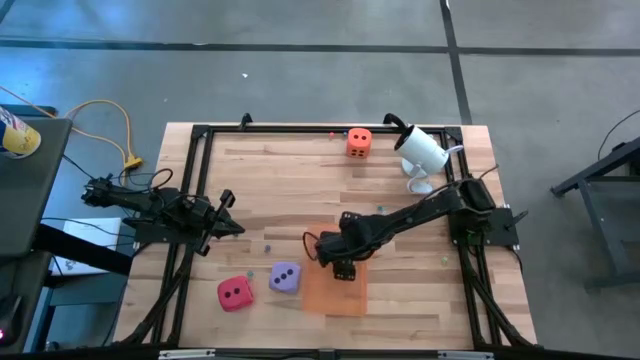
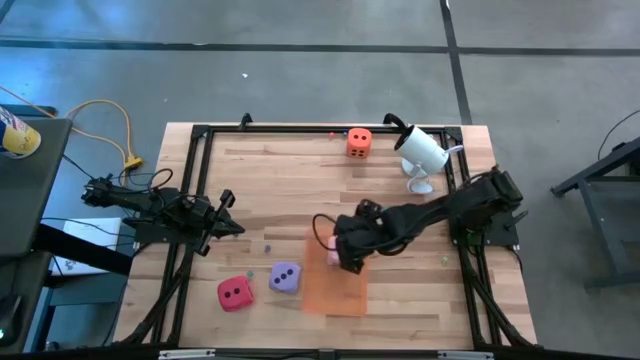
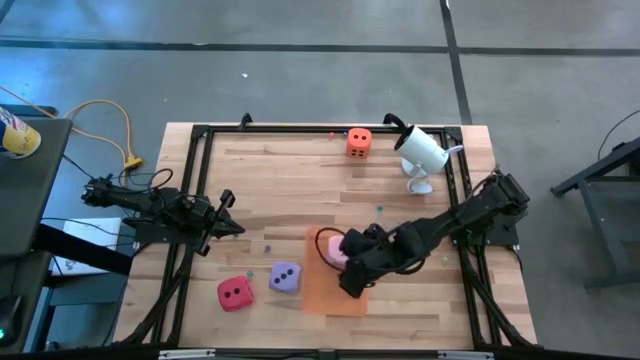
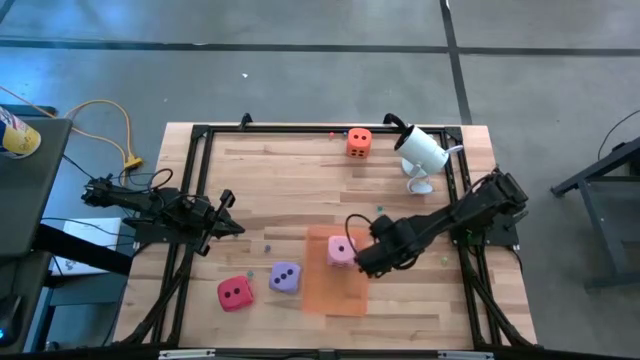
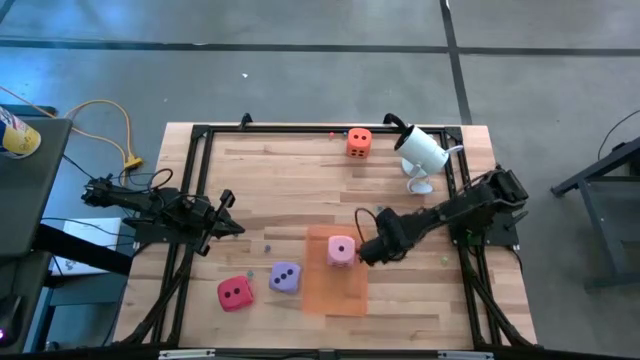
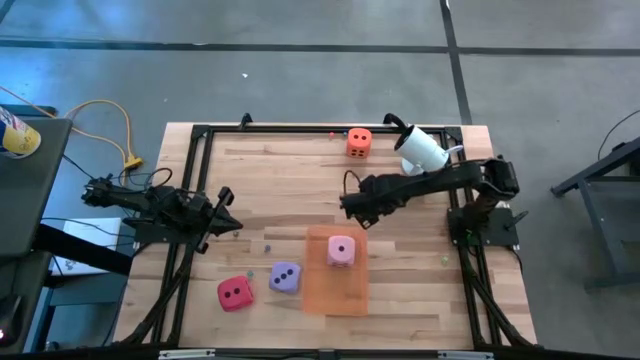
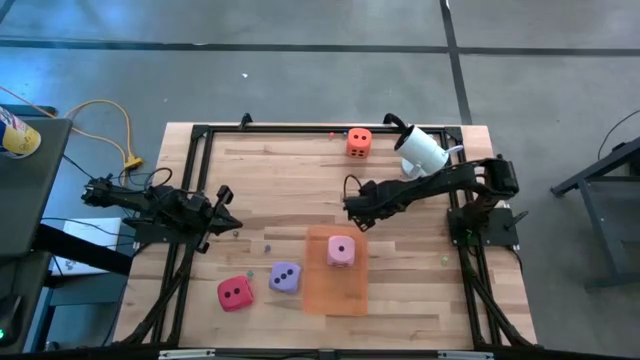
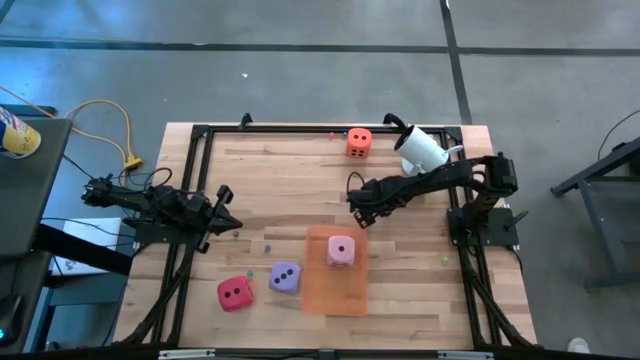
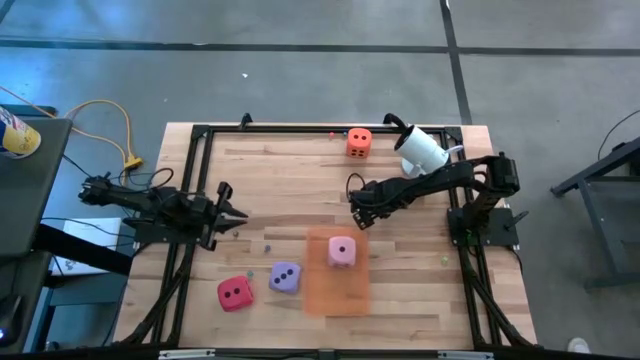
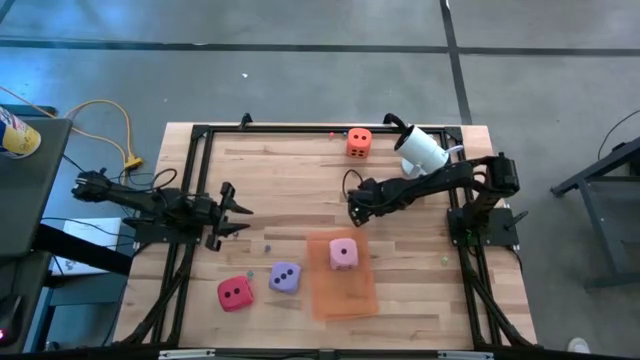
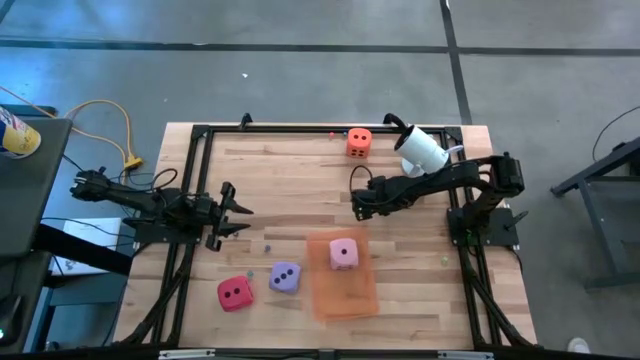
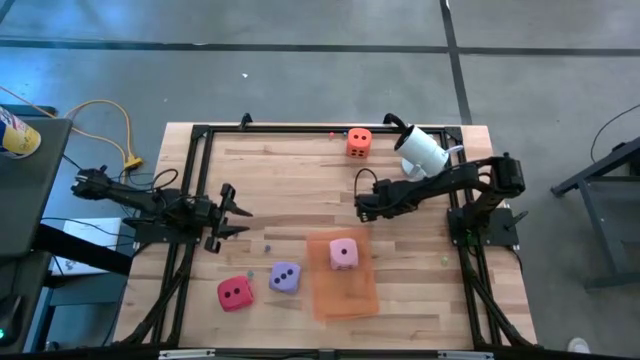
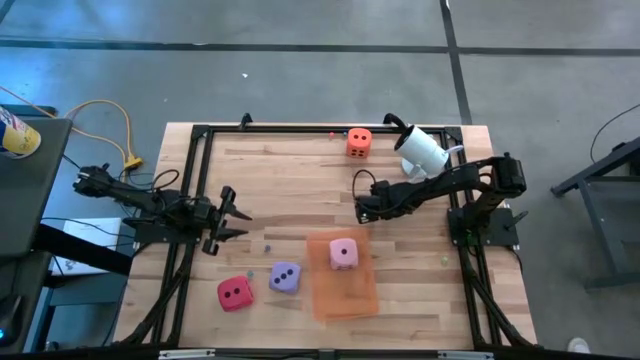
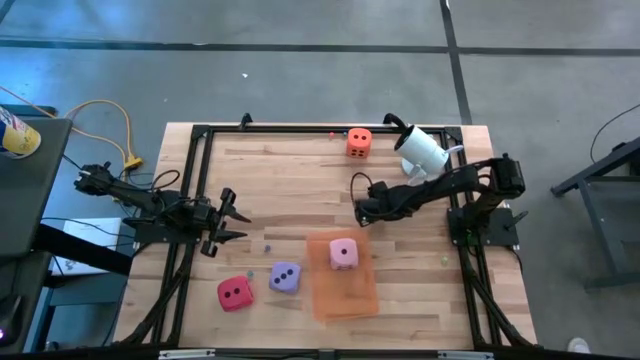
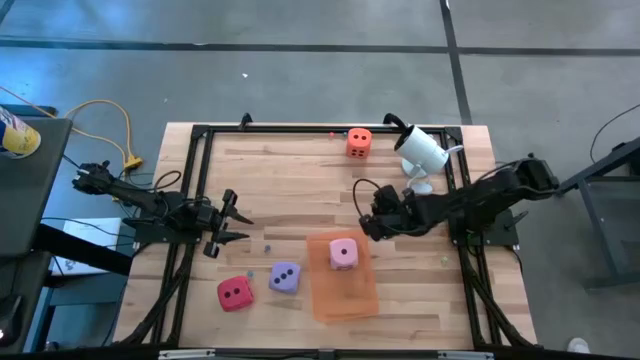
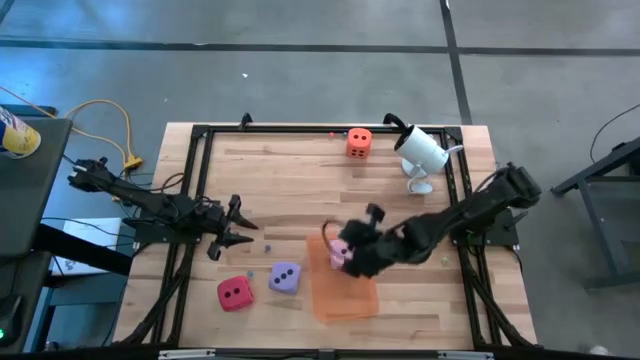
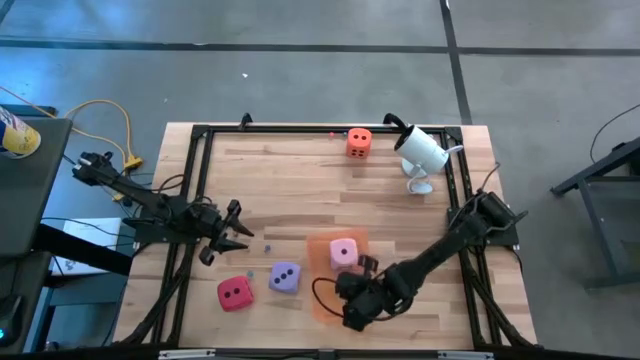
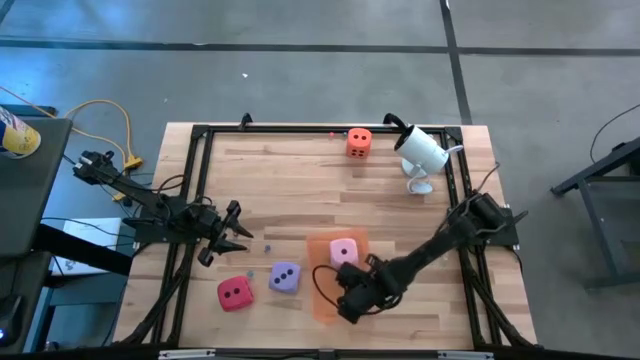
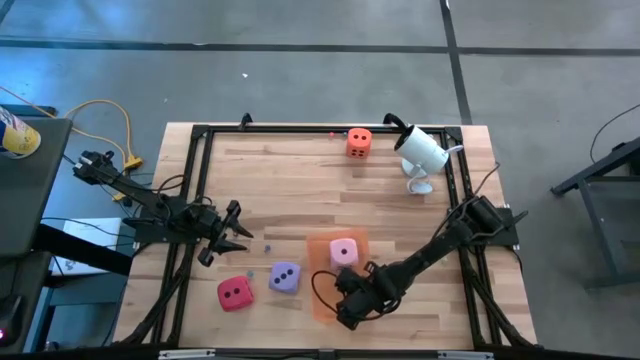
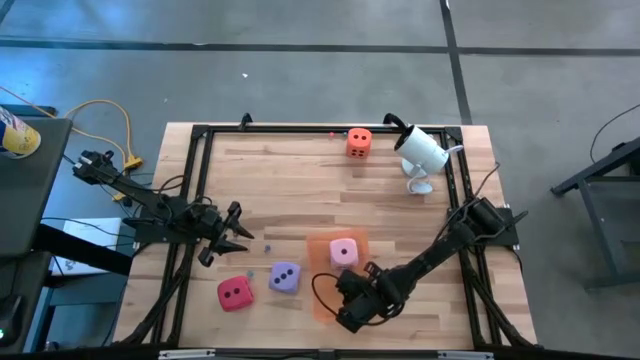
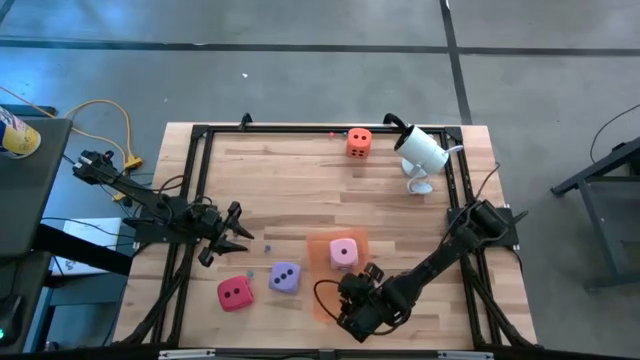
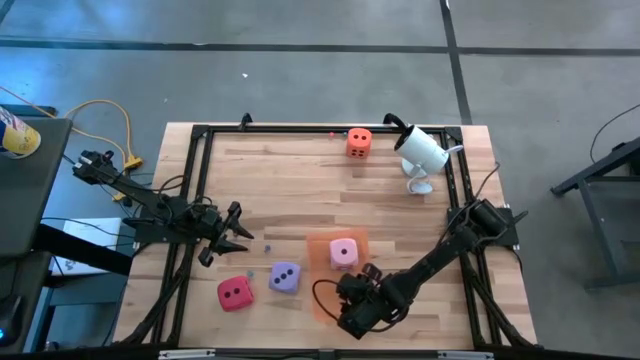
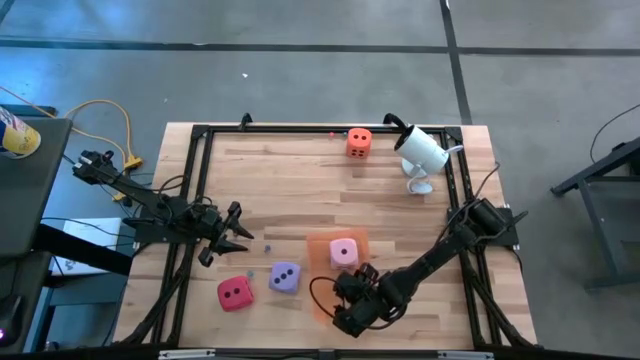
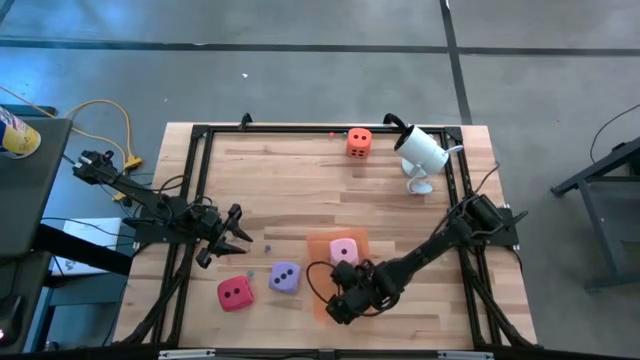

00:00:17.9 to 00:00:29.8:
Task: Pick & Place Dice
Put the small light blue dice into the orange bin

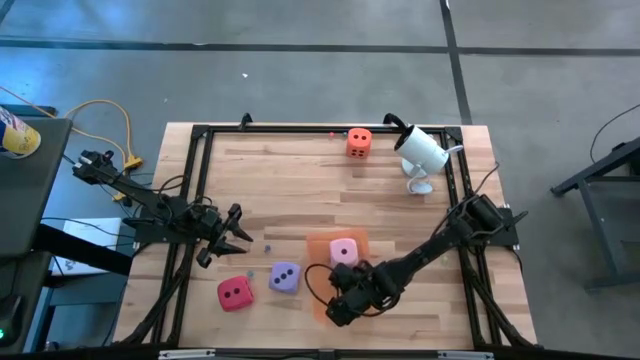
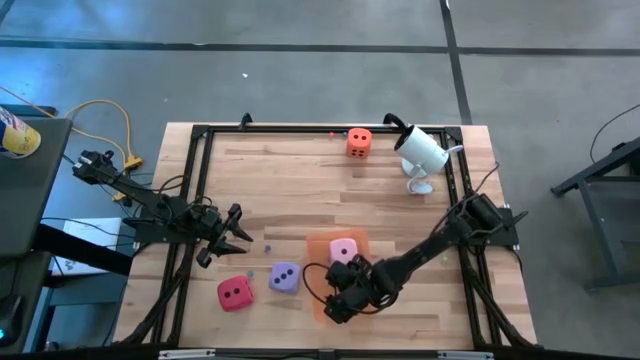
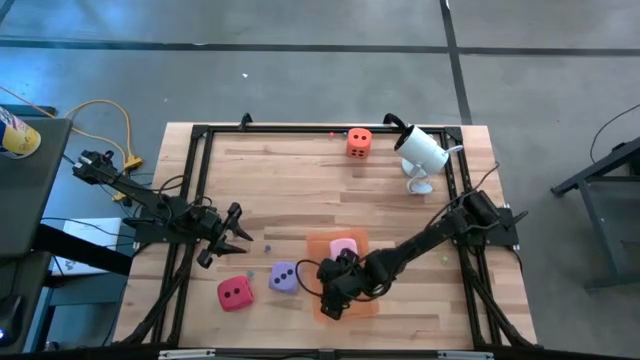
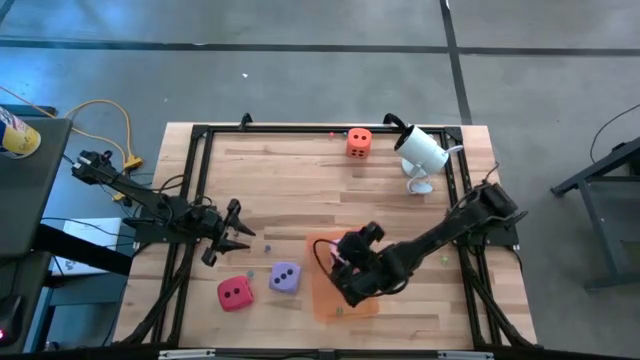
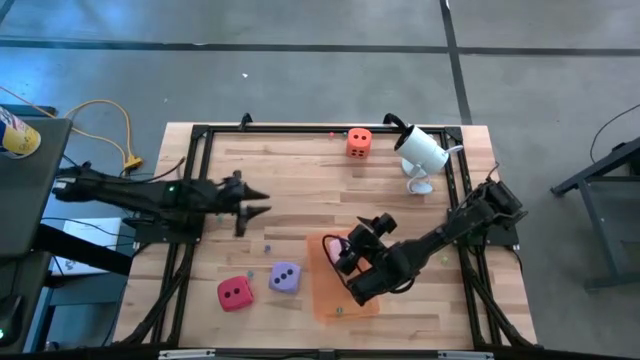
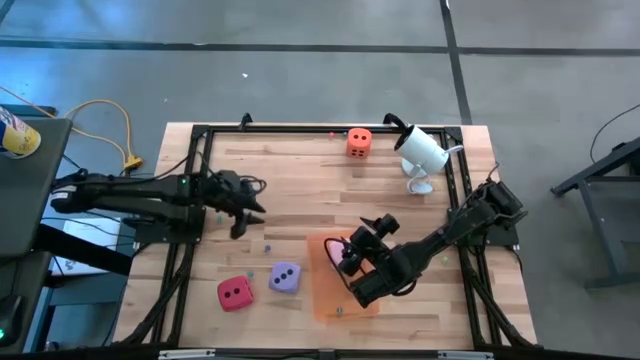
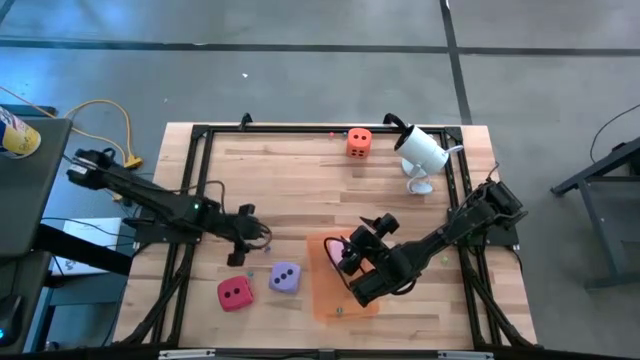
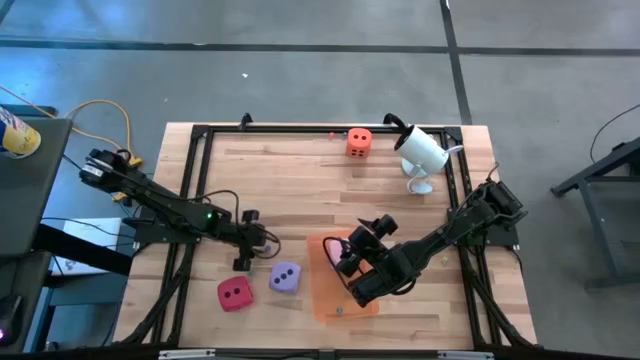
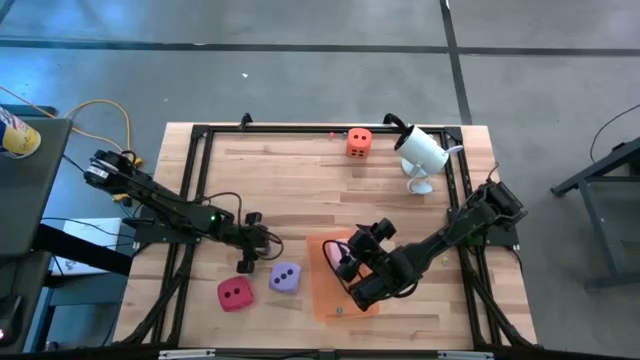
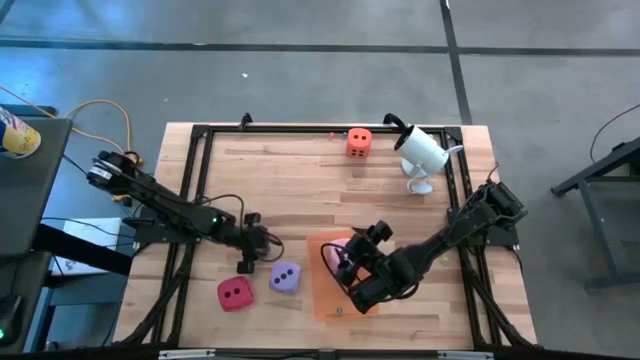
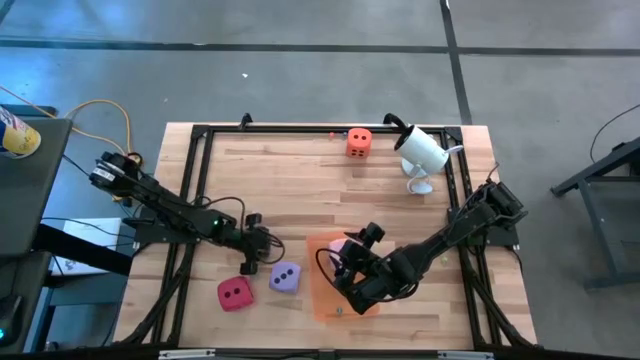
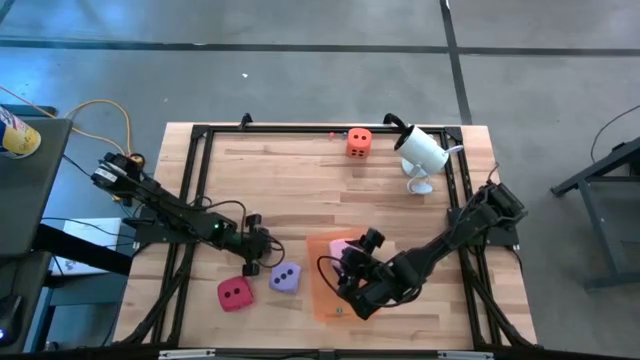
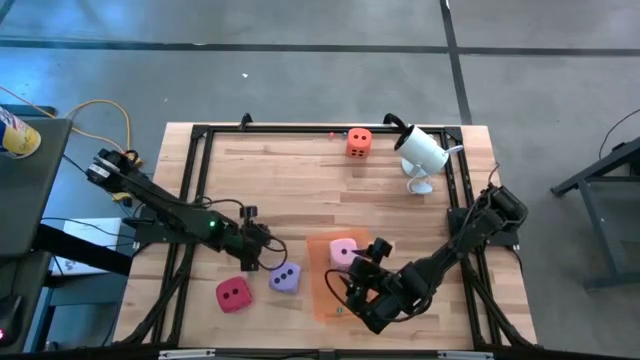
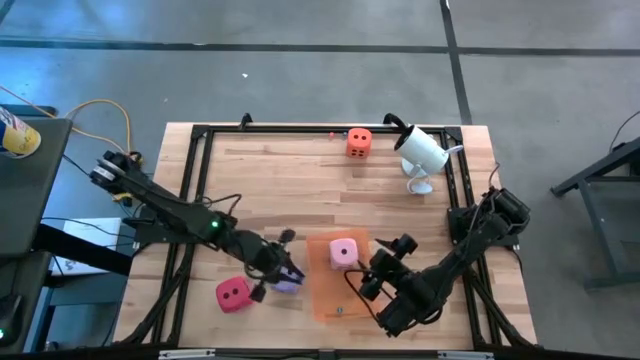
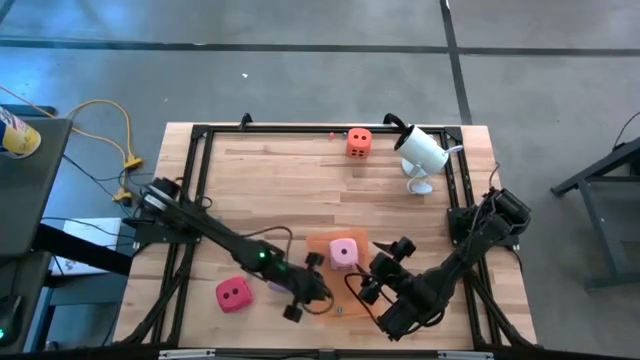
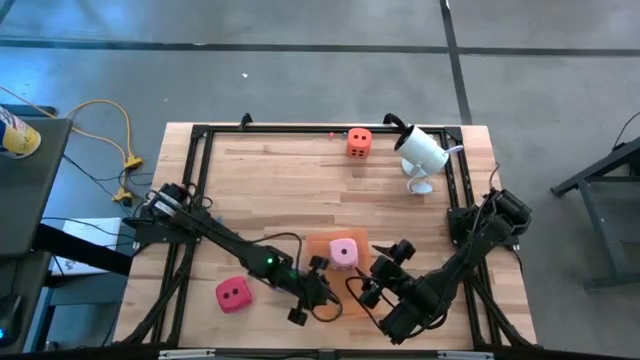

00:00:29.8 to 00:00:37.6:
Put the small blue dice into the orange bin

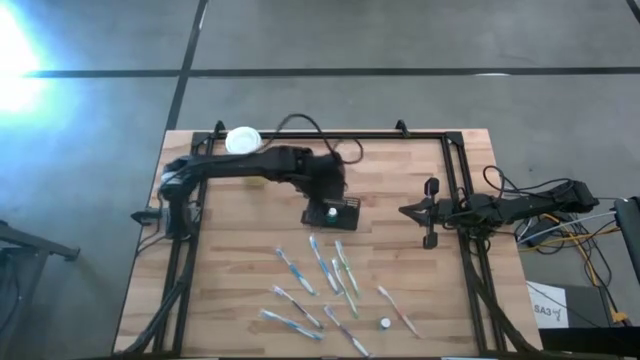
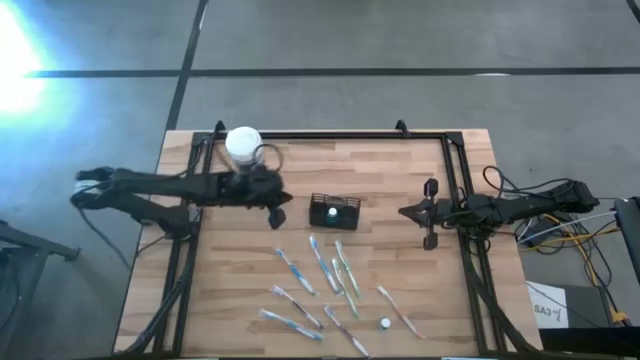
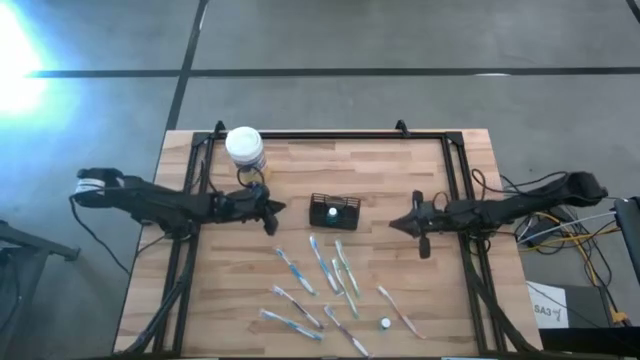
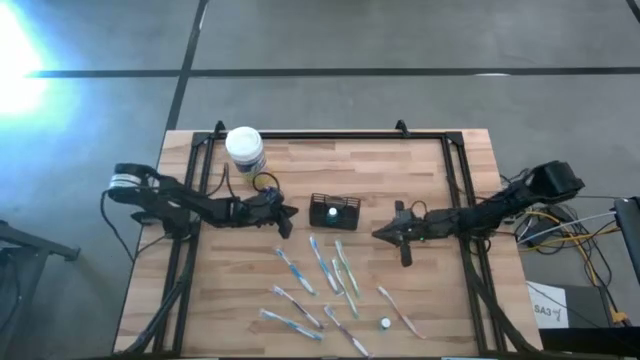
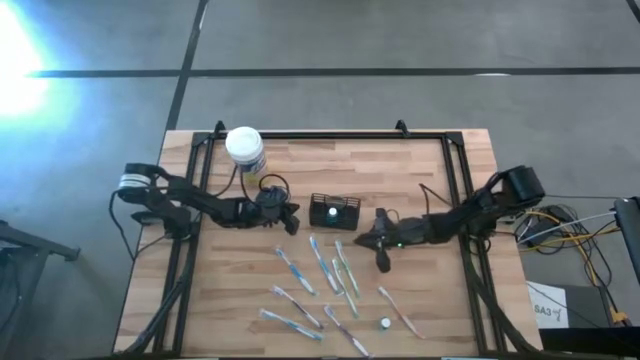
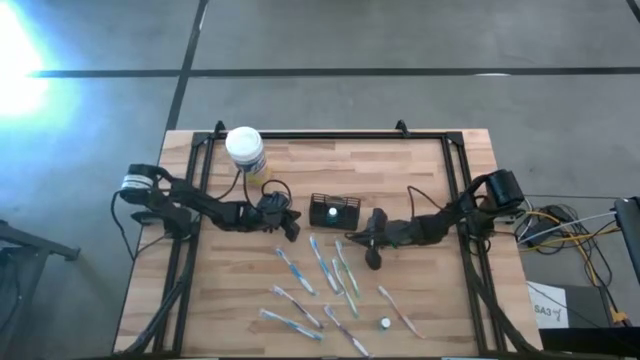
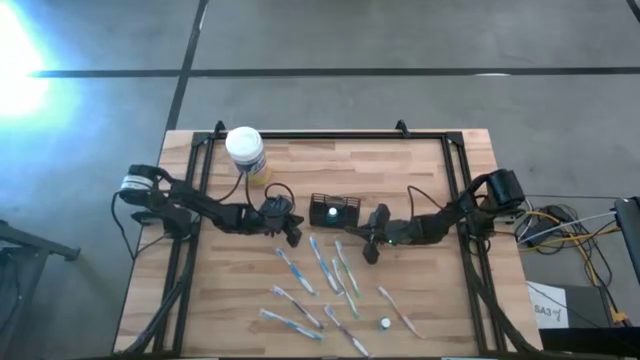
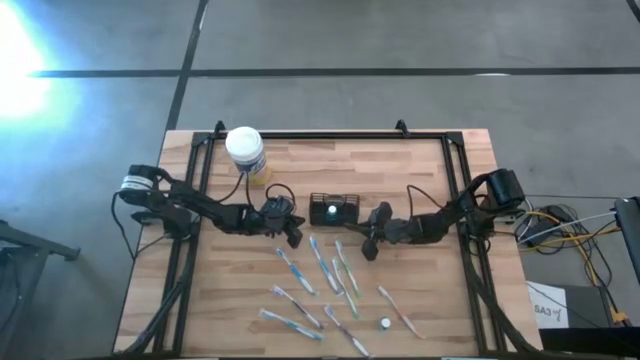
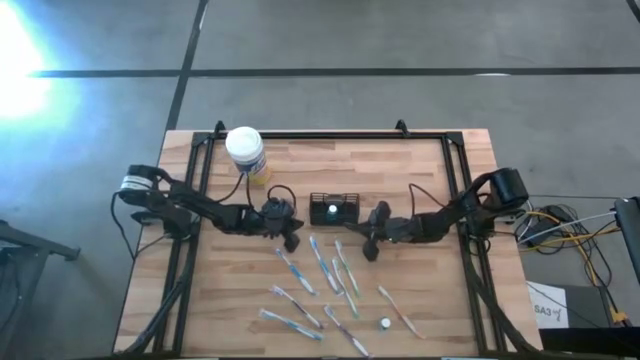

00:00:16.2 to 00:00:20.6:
Task: Pick & Place toothbrushing station
Adjust the black mesh organizer
